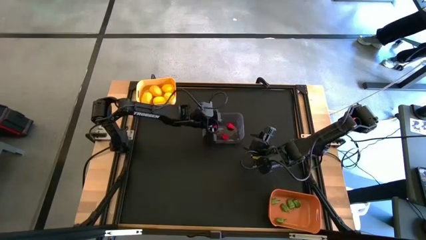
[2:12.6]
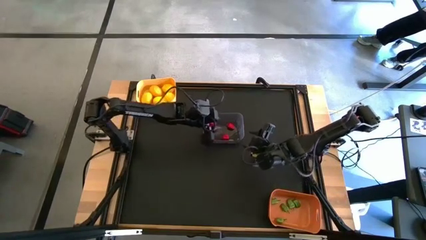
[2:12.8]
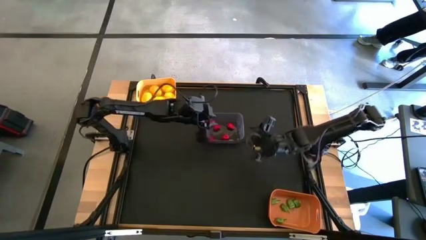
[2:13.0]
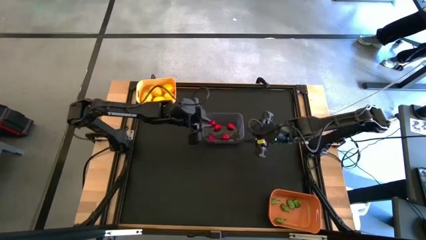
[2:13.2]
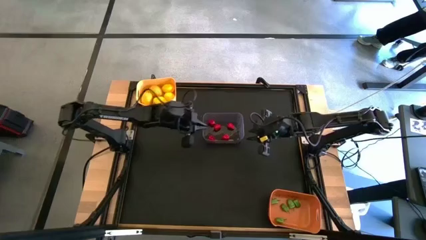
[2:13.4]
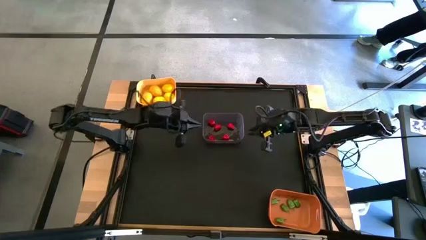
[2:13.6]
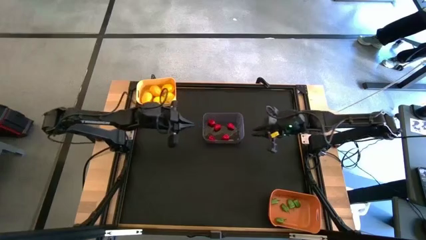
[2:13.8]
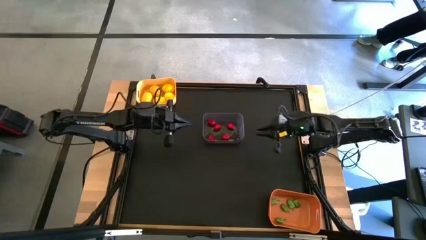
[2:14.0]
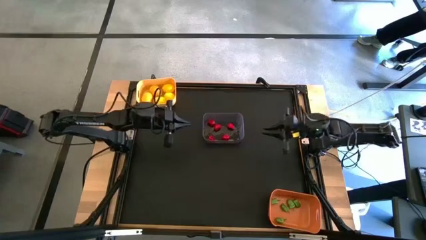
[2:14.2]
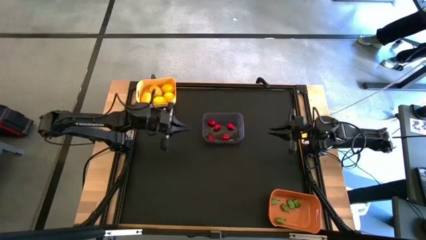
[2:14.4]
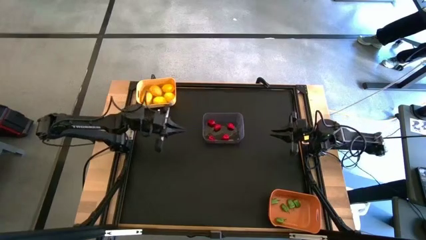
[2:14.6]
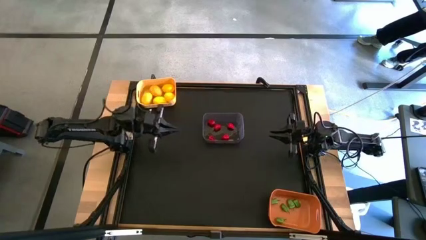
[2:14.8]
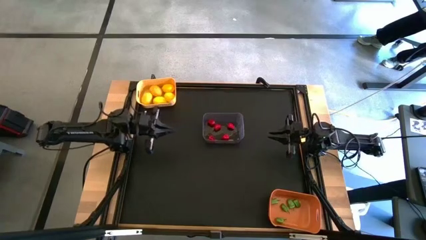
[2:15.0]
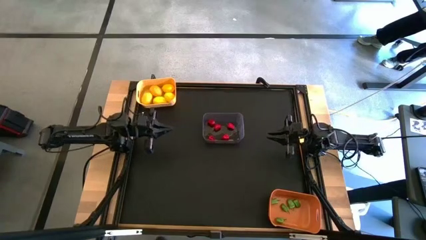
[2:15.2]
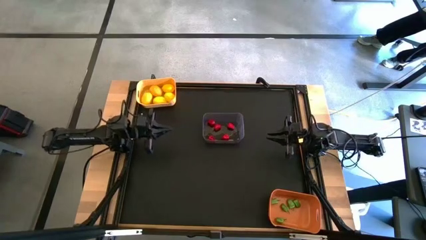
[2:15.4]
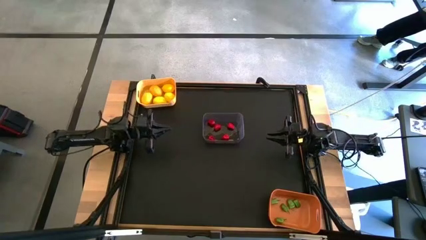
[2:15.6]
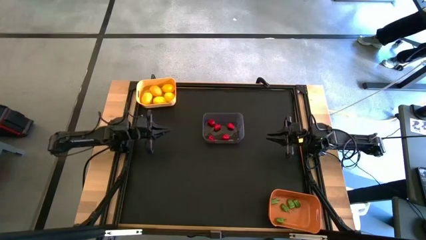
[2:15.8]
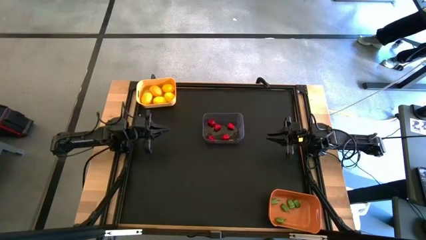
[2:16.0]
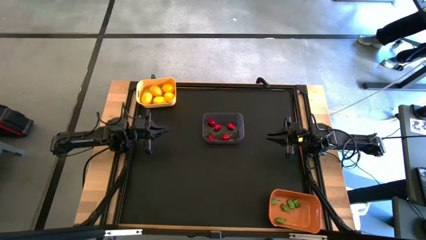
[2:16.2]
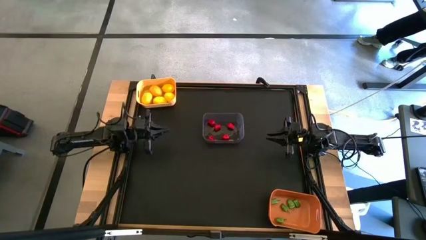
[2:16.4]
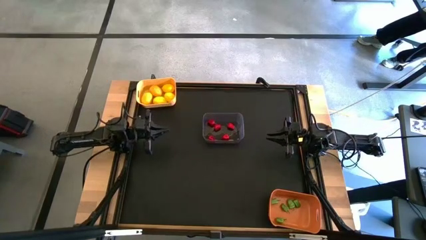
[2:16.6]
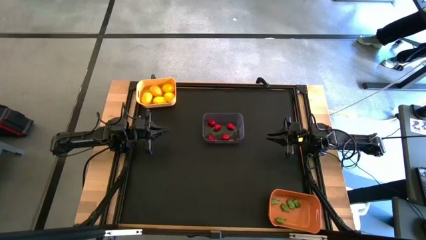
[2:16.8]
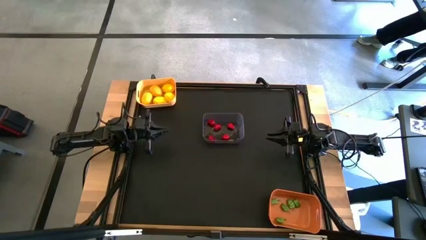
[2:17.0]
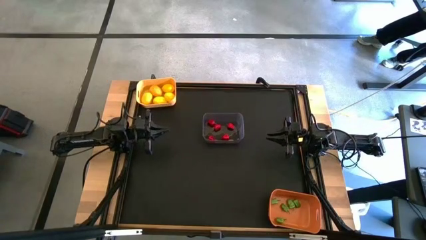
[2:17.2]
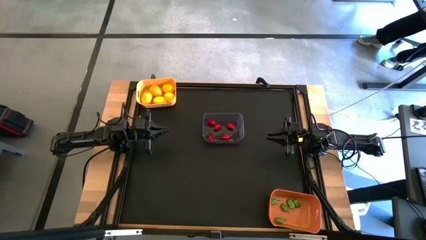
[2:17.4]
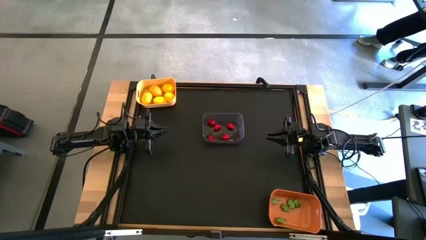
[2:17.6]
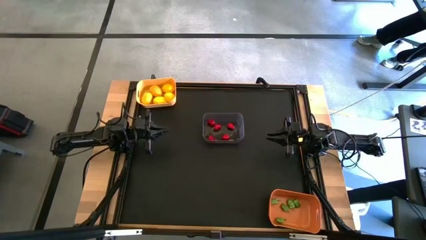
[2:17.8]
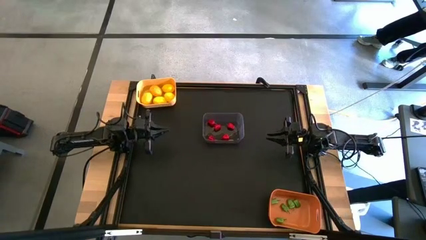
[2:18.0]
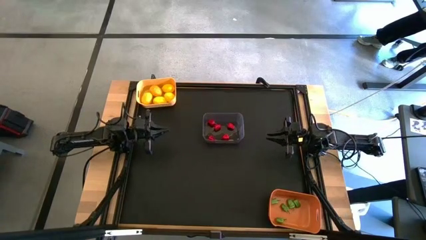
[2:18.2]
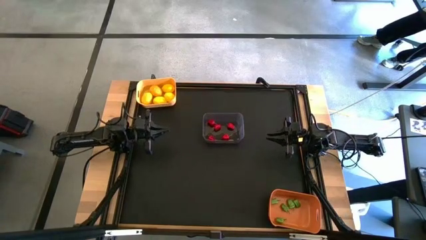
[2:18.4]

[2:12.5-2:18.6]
Task: Sort produce into baskets
Return to Home Position
